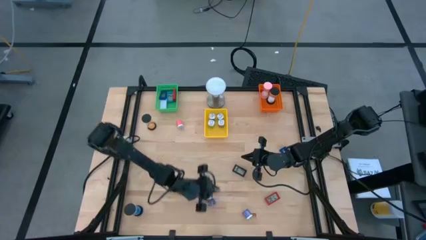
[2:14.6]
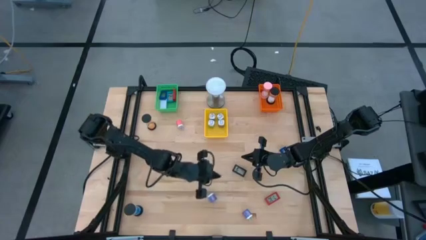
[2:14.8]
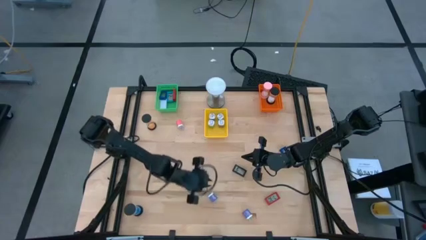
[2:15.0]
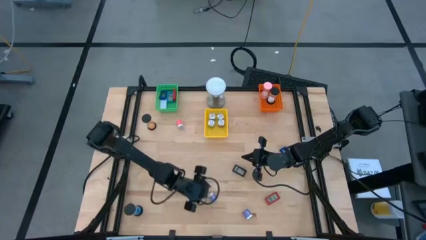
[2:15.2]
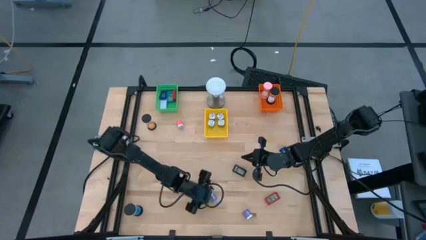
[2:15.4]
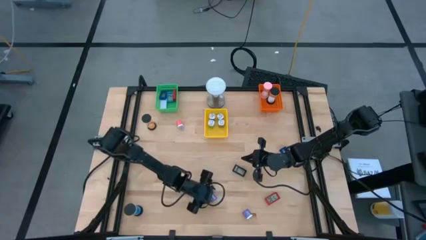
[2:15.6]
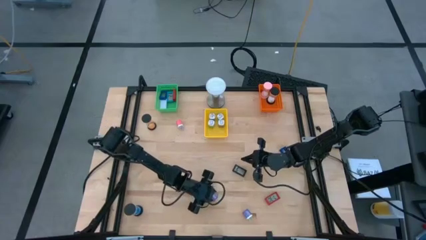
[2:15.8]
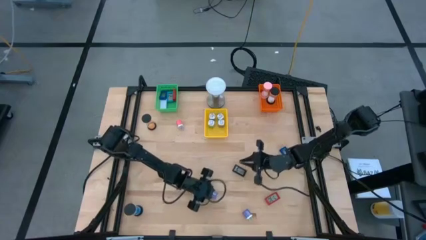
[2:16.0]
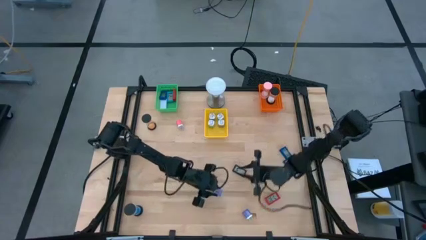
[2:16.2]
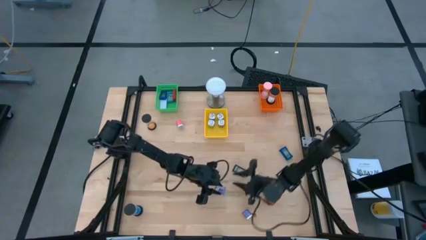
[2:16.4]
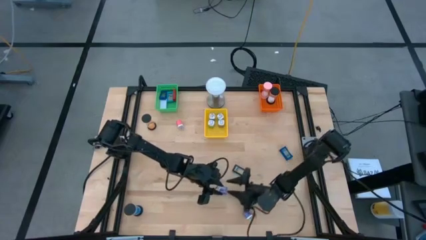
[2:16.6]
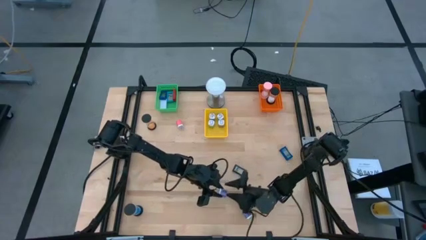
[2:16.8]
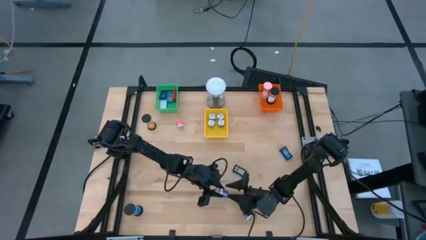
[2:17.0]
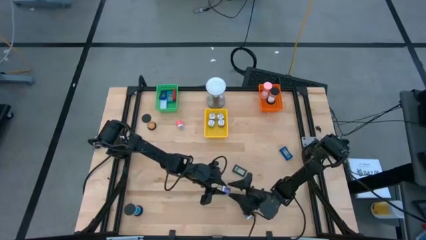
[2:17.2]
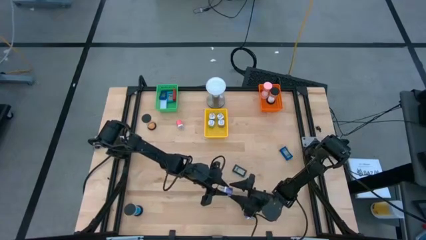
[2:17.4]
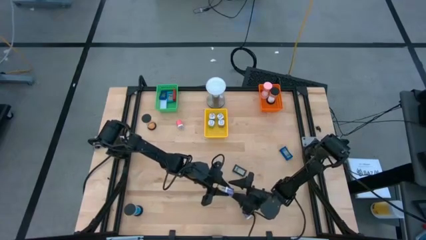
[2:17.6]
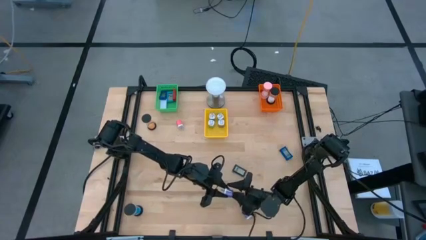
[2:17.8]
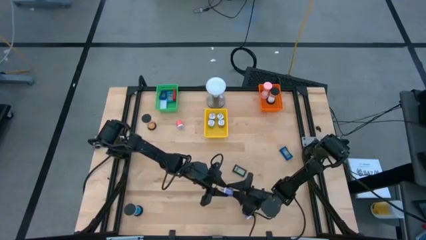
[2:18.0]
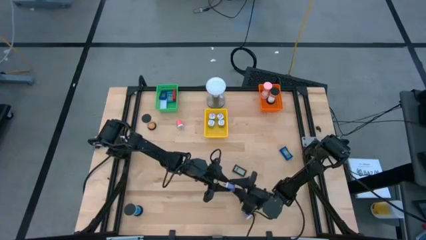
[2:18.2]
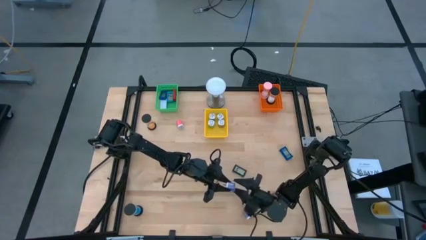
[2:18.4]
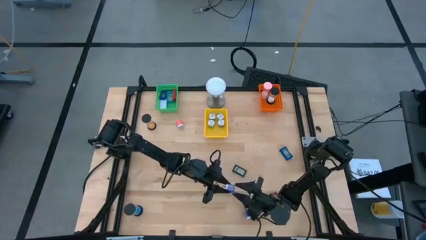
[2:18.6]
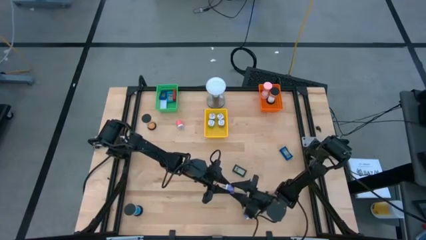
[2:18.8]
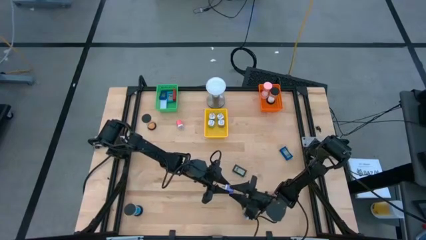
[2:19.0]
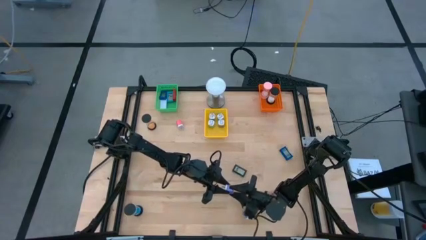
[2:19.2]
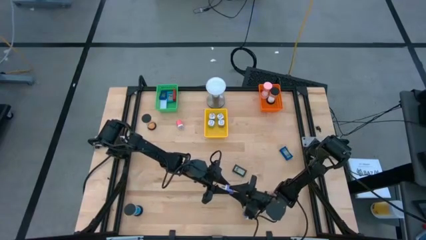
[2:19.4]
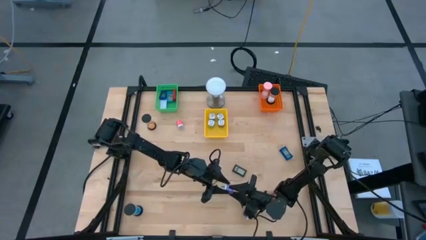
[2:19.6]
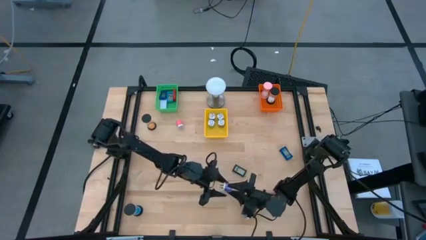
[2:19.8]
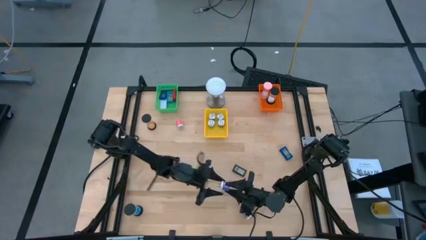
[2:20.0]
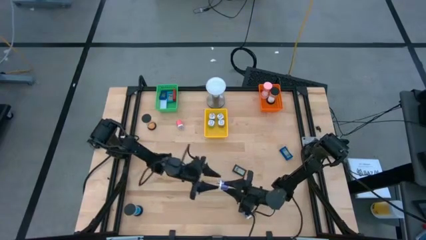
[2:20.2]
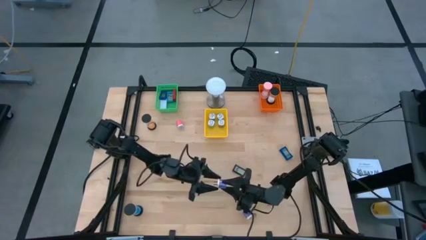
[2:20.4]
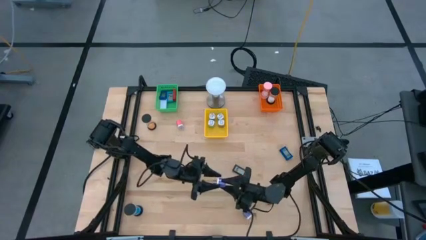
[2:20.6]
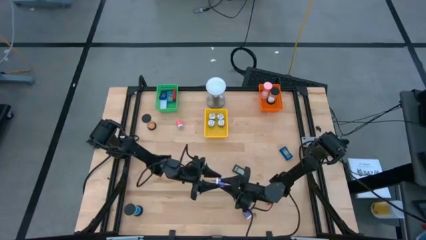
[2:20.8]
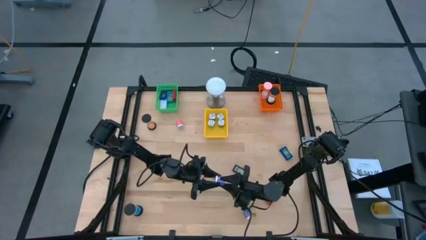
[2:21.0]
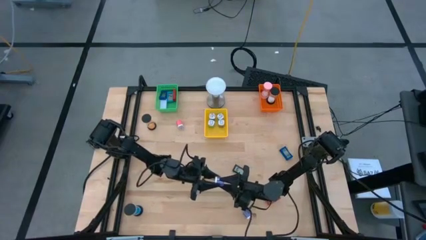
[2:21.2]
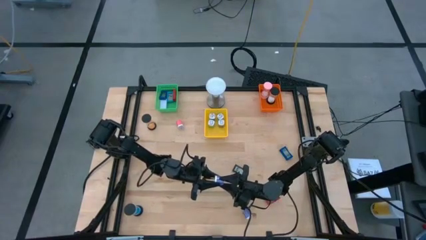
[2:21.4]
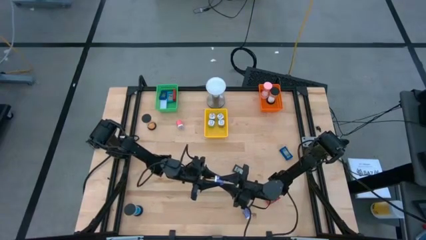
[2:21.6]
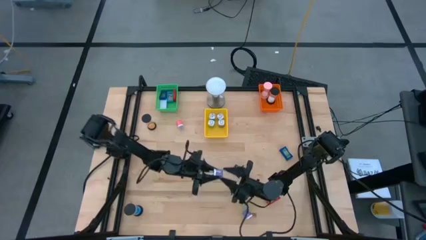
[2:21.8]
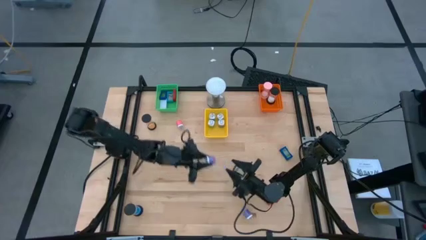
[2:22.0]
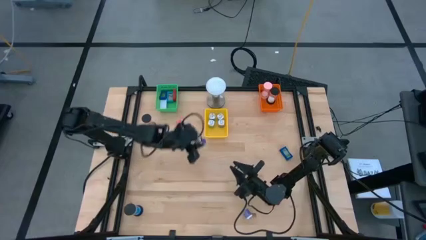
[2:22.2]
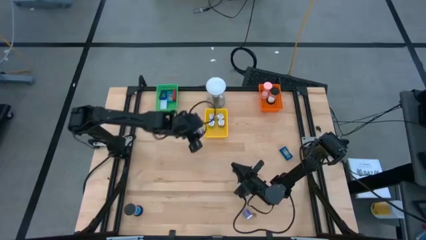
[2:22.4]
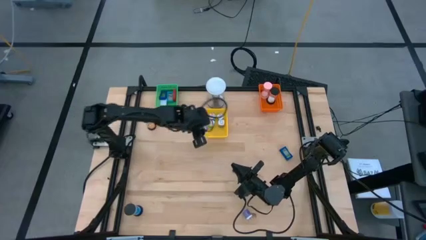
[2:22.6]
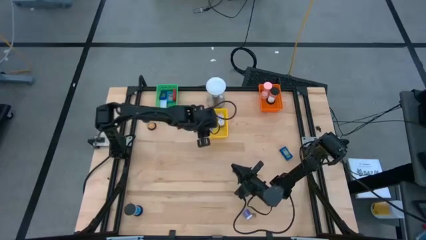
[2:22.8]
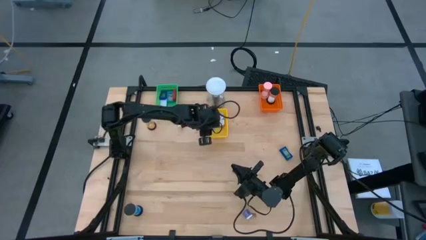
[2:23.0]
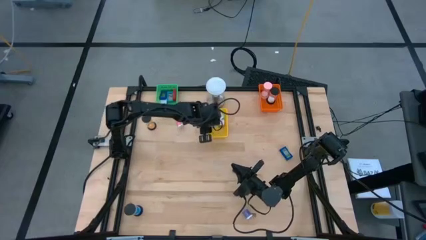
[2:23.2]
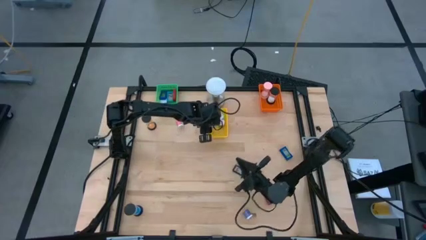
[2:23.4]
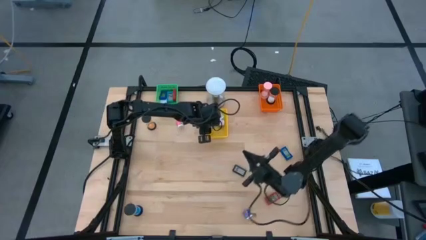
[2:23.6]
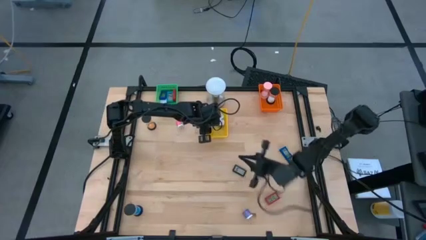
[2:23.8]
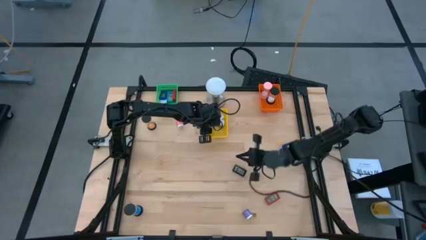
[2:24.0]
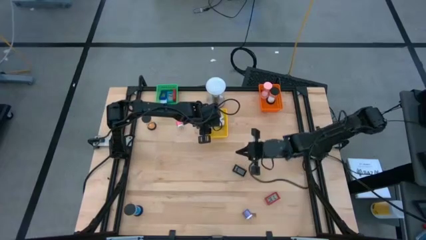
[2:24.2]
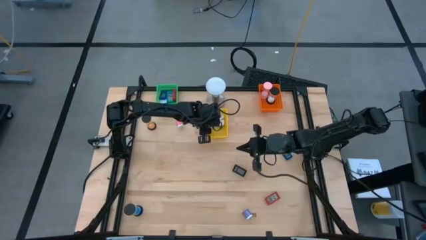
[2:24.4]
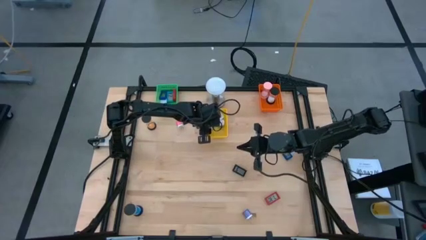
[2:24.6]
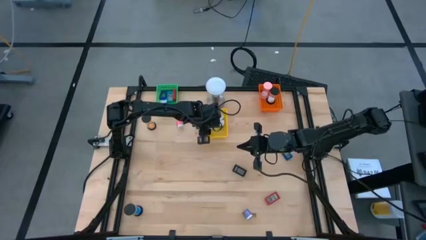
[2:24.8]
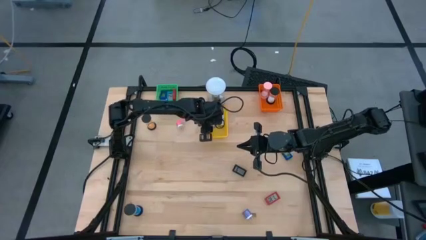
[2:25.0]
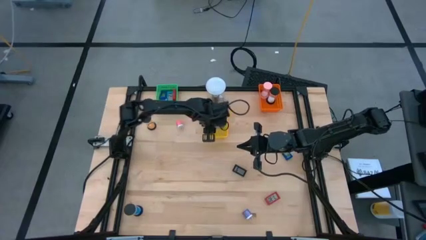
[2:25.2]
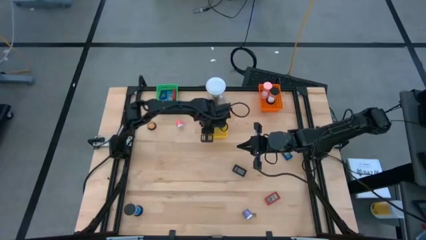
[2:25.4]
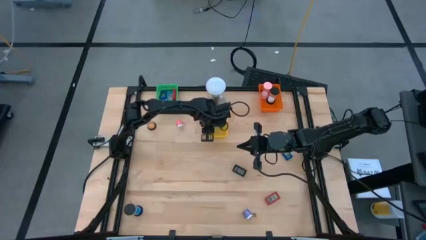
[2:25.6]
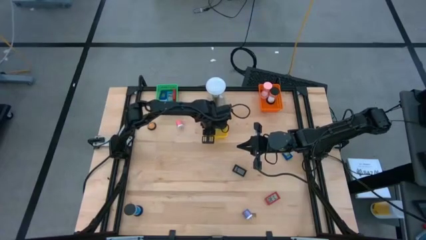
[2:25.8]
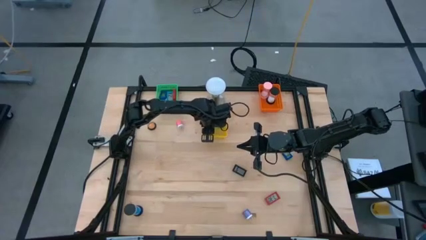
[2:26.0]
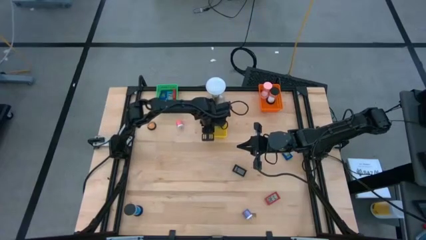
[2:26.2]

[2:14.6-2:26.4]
Task: Pick & Place Office items
Put the left purple charger adapter into the yellow bin

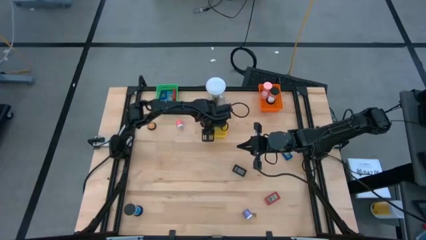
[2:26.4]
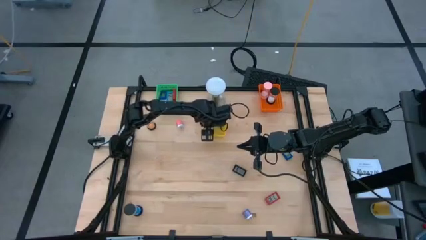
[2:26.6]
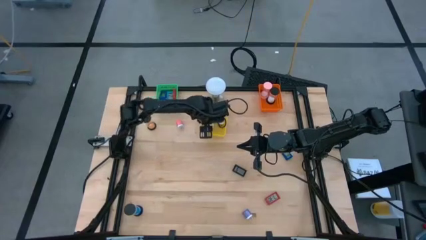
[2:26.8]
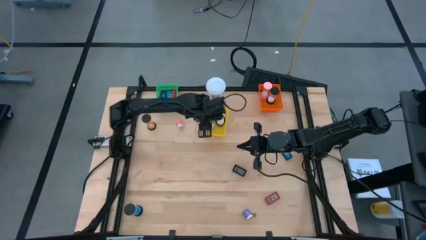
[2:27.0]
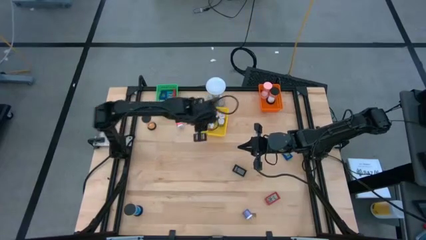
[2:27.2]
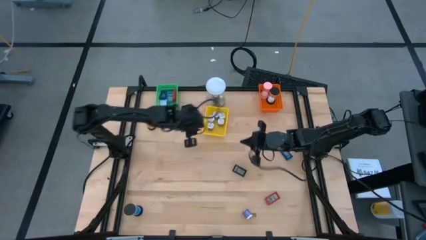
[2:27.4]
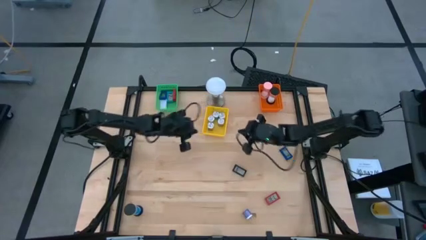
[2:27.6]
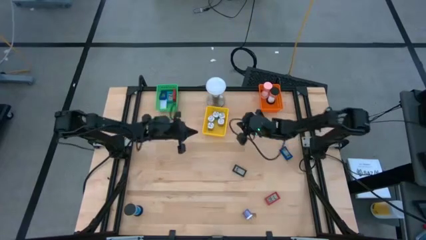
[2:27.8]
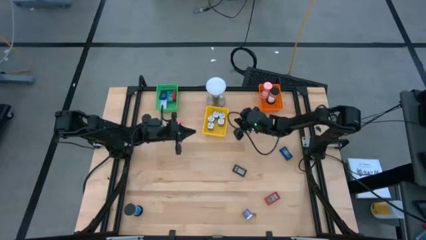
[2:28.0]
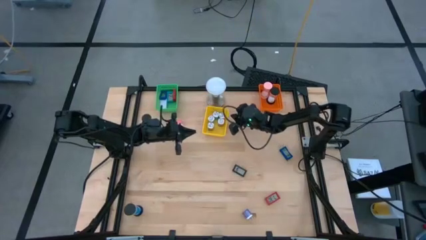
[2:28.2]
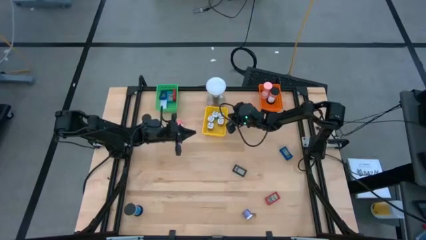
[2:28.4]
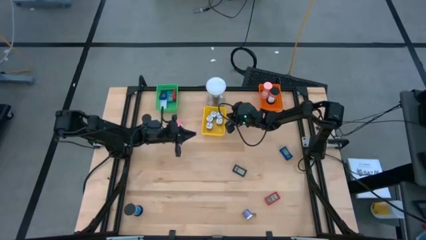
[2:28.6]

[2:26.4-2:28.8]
Adjust the yellow bin
